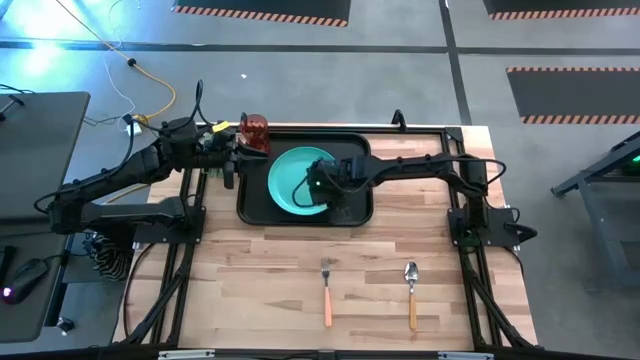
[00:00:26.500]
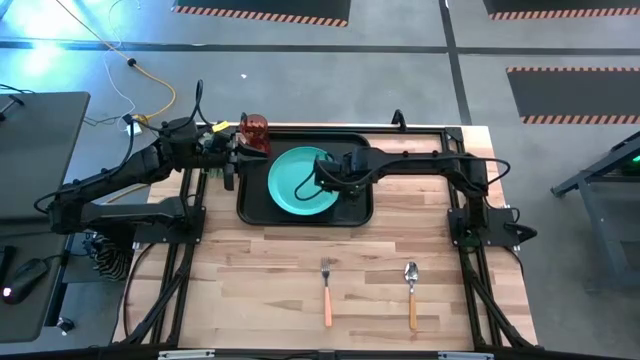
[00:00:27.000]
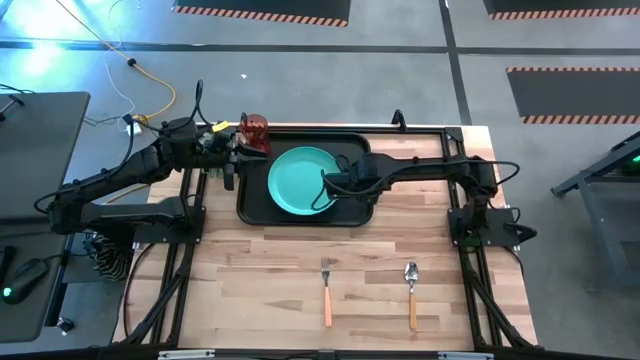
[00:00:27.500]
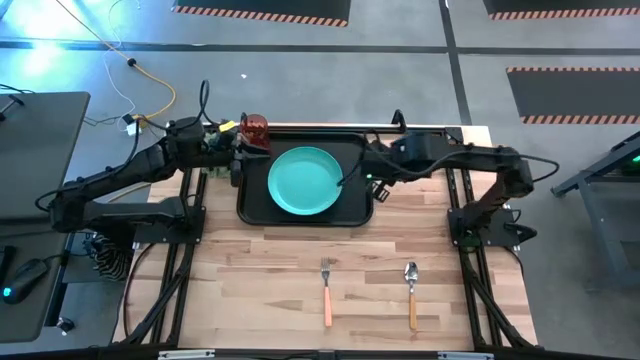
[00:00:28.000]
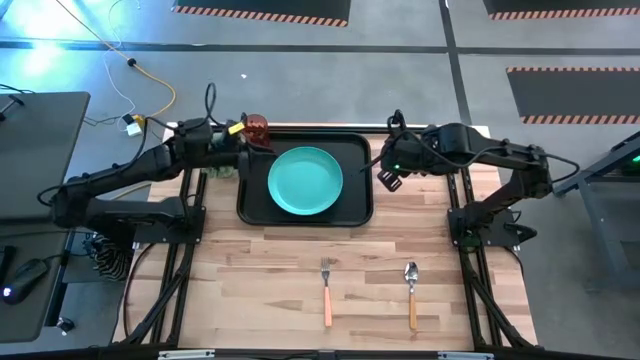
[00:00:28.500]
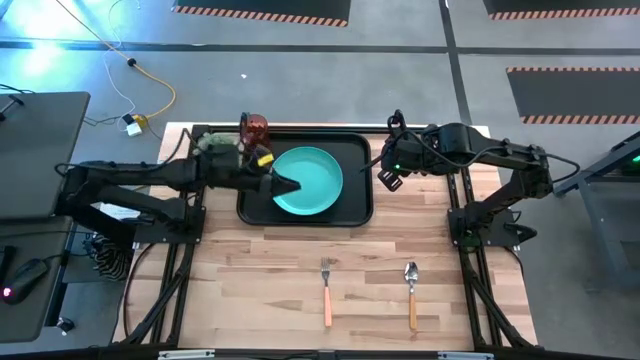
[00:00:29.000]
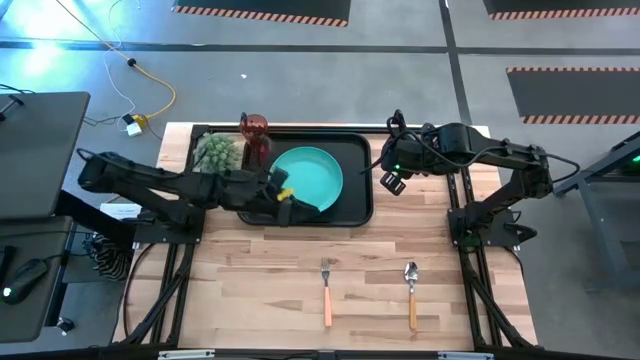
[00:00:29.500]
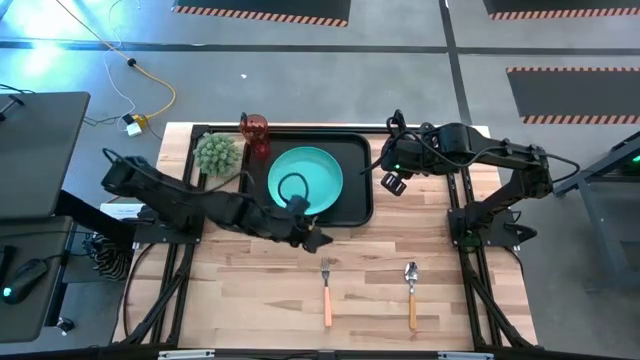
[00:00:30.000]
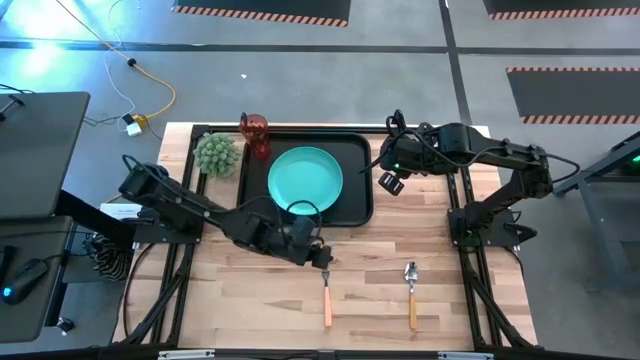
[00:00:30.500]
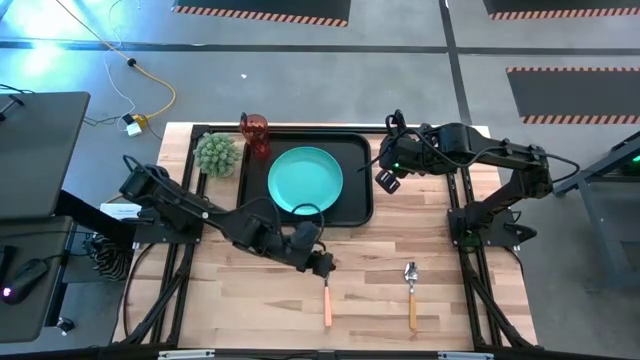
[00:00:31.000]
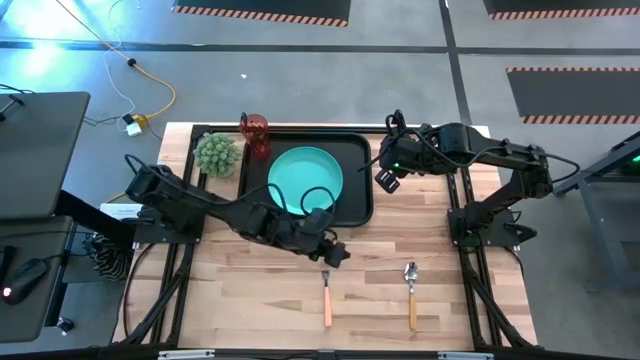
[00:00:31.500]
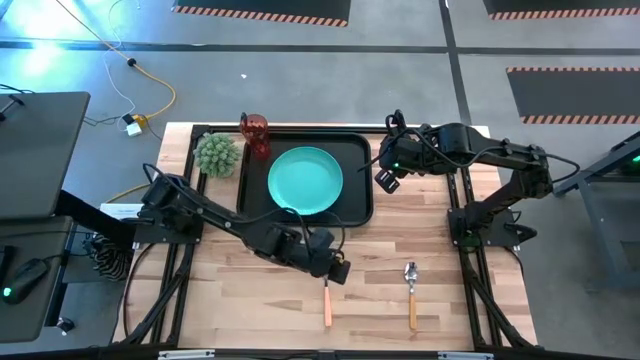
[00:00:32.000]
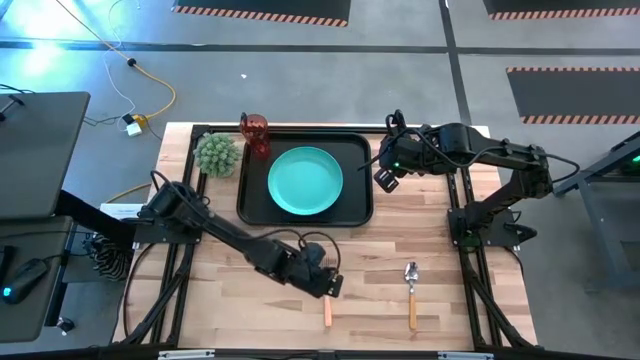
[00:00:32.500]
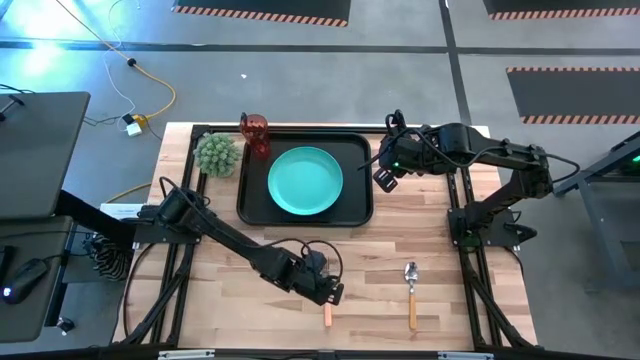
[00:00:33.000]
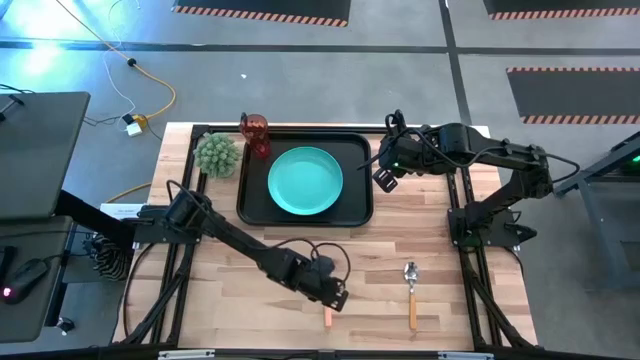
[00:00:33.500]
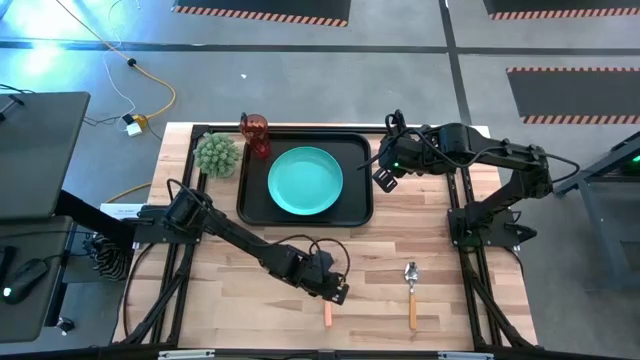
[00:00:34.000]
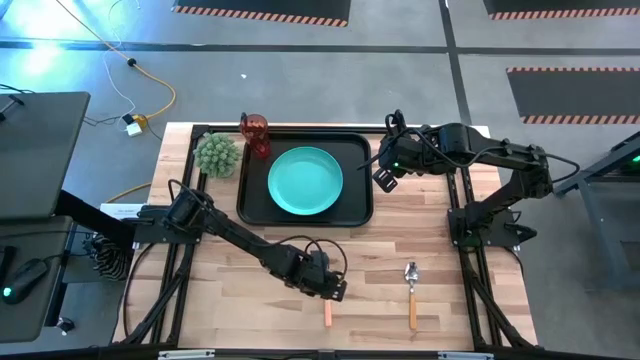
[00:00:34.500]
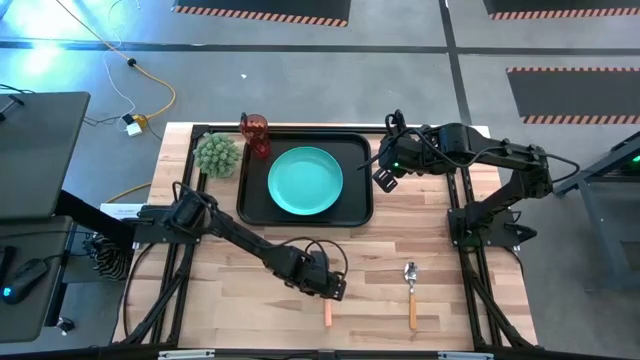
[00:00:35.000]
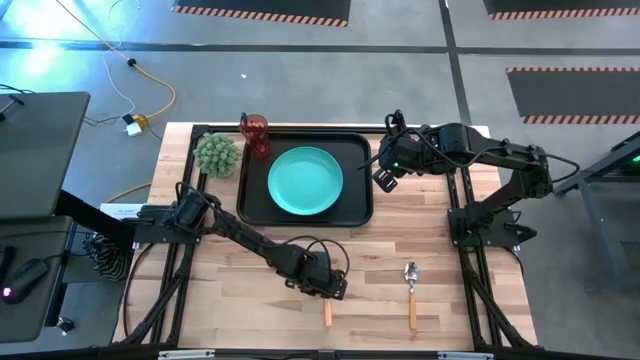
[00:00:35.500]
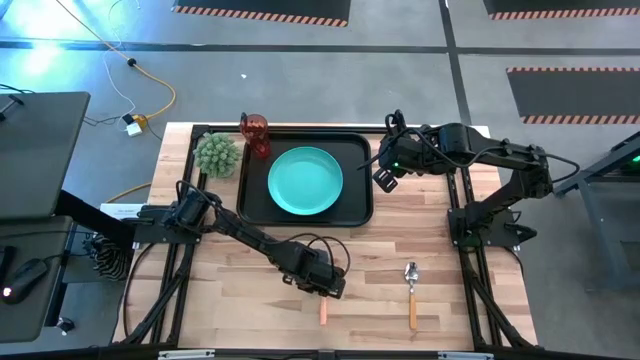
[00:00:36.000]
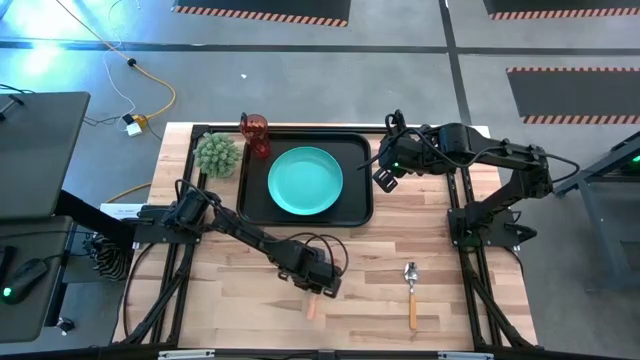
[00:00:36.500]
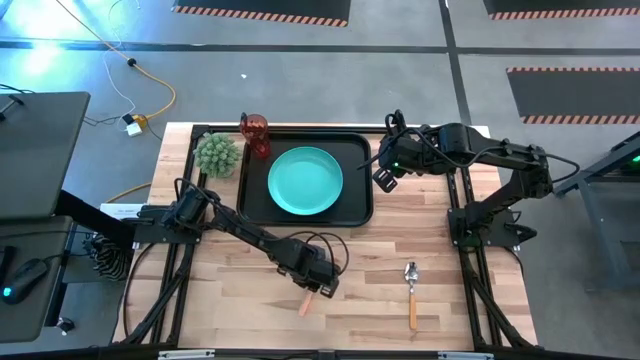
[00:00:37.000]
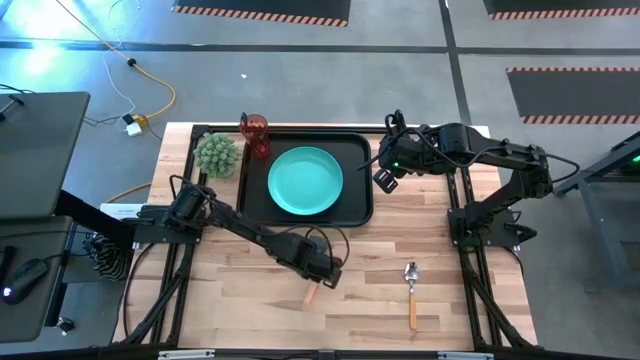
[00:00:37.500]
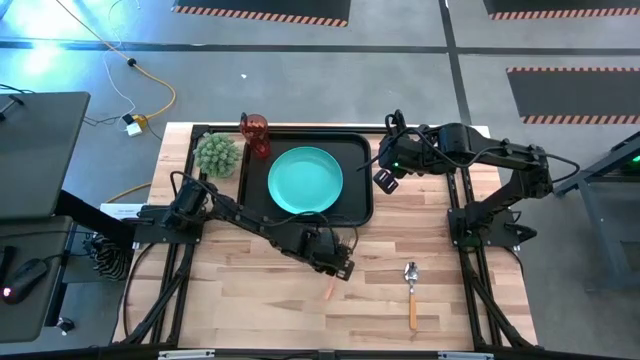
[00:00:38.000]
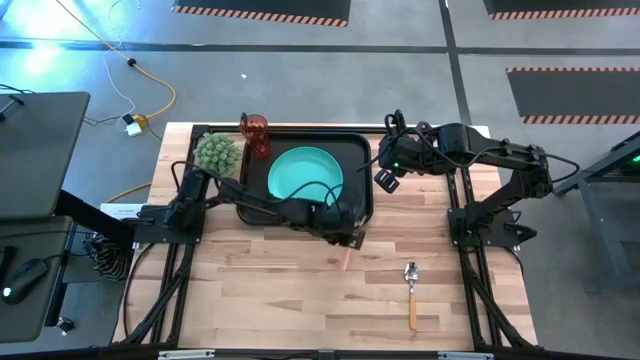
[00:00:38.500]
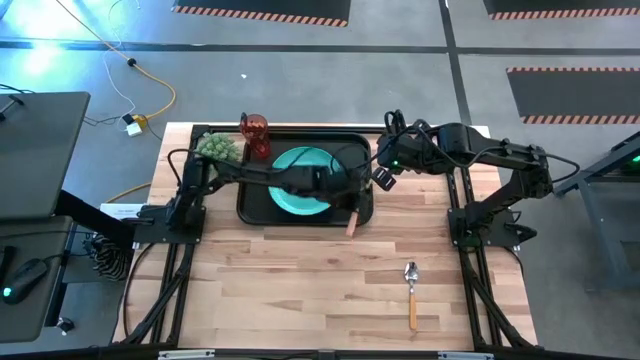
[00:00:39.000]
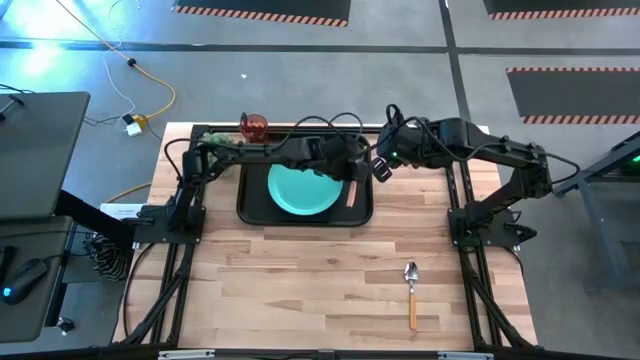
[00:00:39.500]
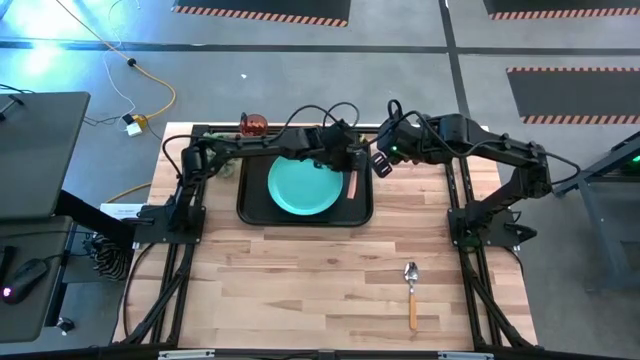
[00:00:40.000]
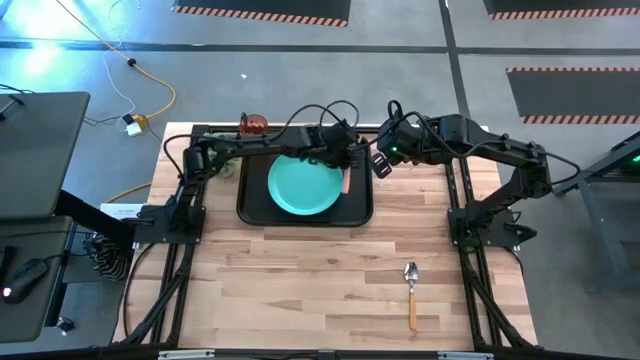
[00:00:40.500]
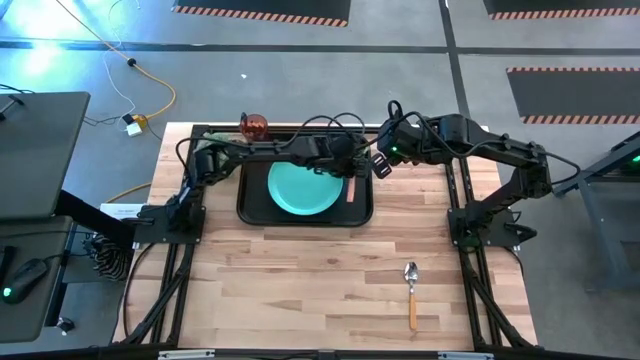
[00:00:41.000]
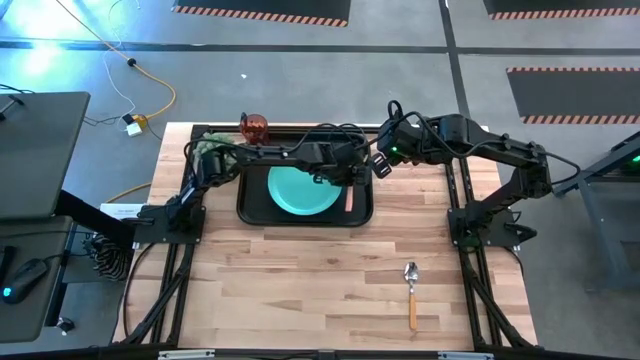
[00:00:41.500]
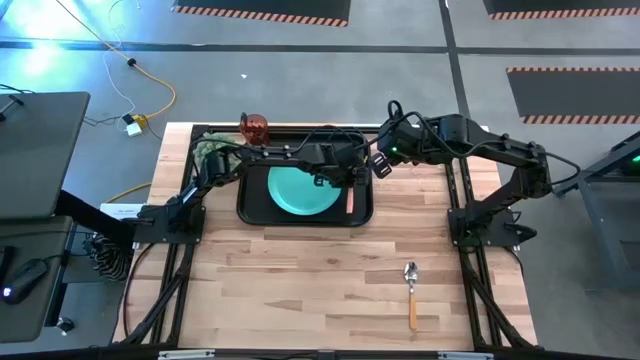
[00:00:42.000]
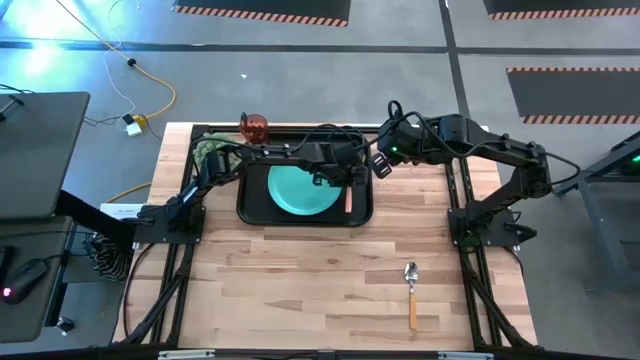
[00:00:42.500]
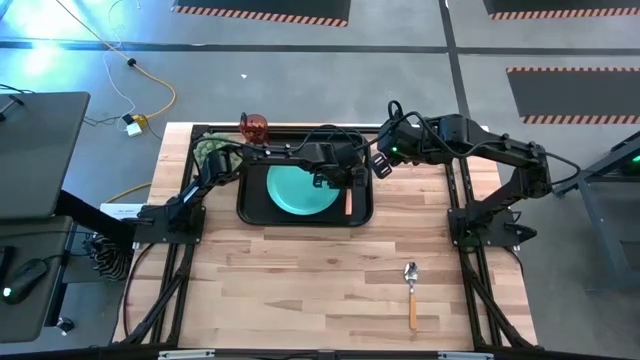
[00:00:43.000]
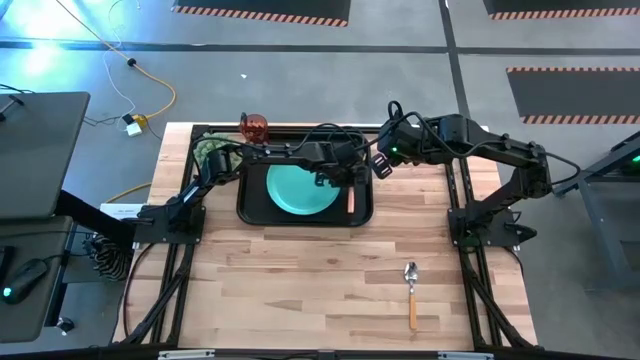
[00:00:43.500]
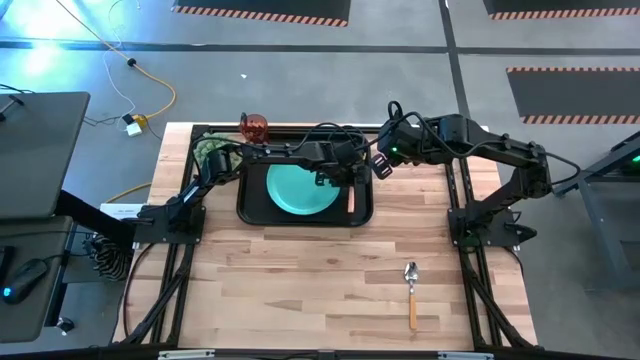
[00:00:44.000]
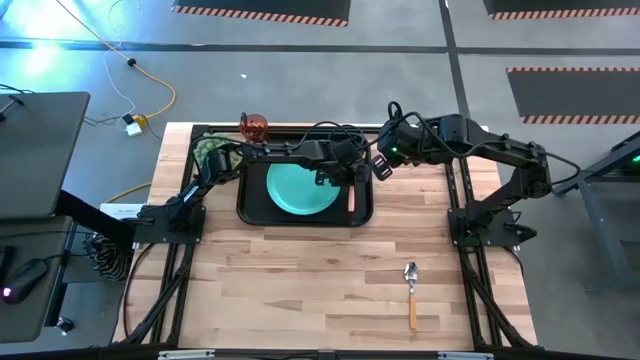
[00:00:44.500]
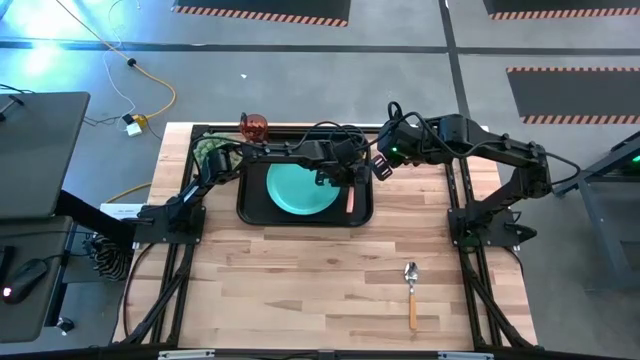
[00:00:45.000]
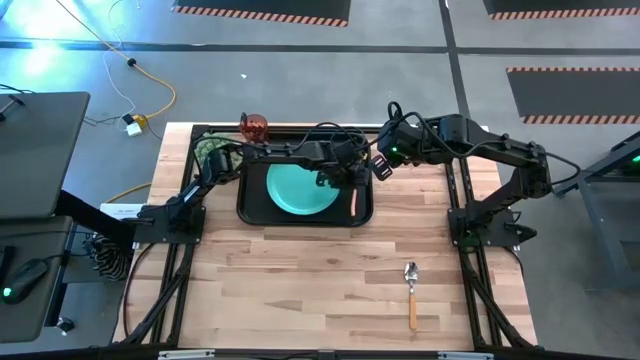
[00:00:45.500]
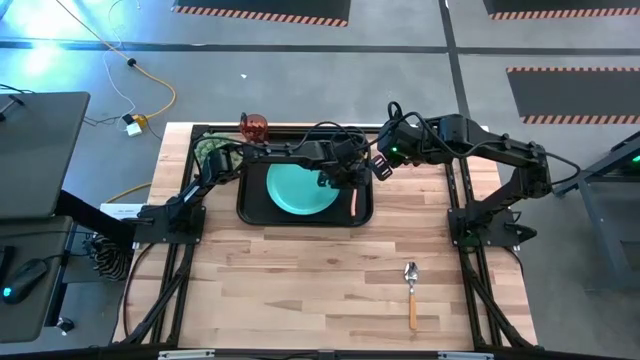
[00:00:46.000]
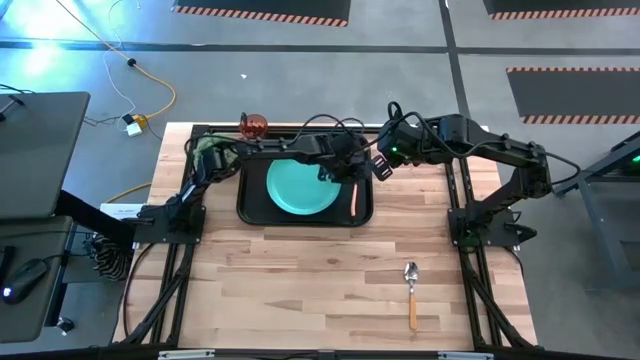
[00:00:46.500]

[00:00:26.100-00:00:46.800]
Task: Pick and place plate/cup/fork/spoon on tray
Put the orange fork to the right of the blue plate on the black tray

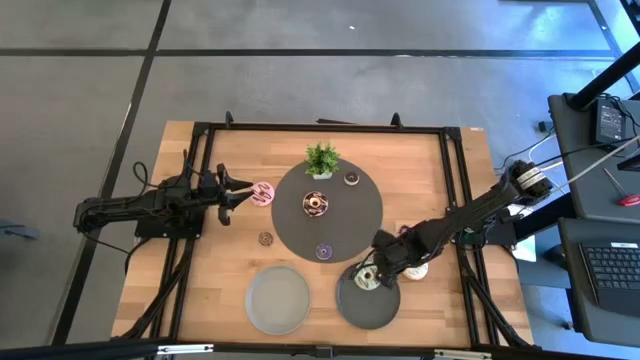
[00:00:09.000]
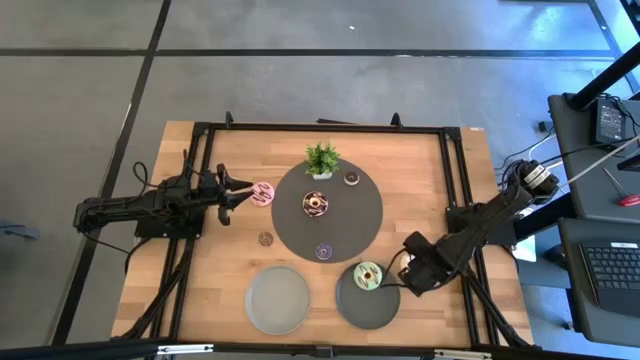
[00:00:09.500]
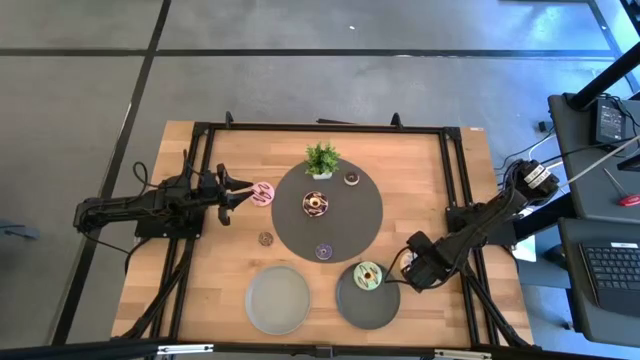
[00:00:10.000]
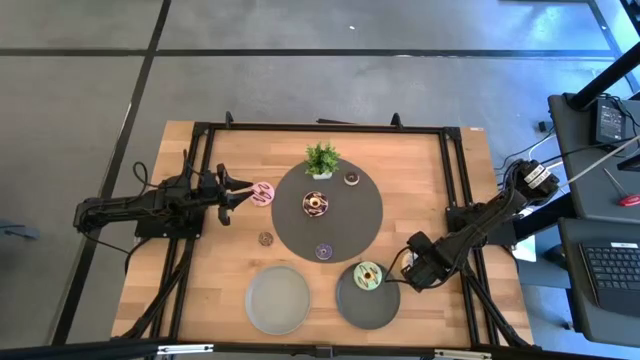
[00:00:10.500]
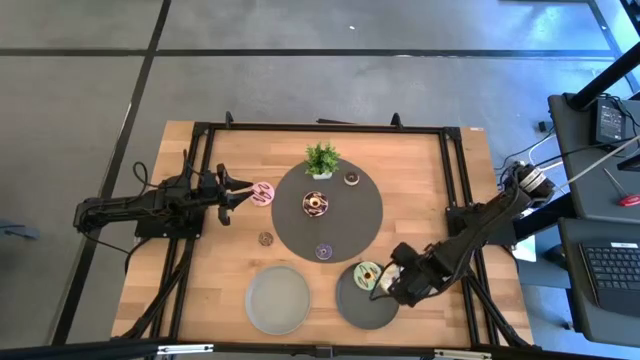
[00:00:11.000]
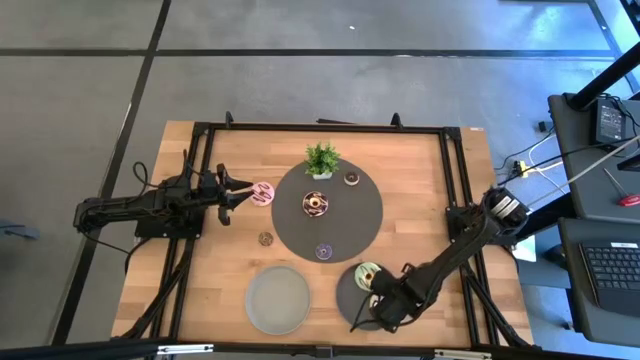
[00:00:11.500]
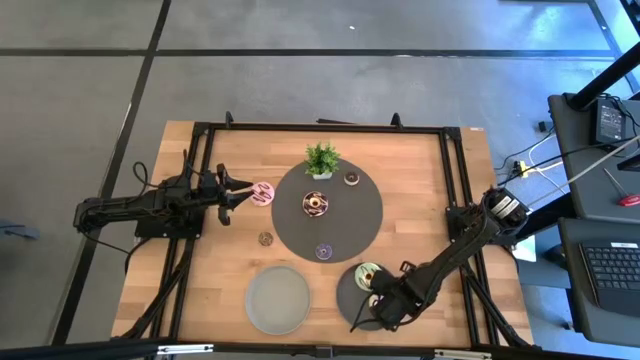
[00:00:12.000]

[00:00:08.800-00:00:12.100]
Task: Pick & Place donuts
Put the big white donut on the black plate
